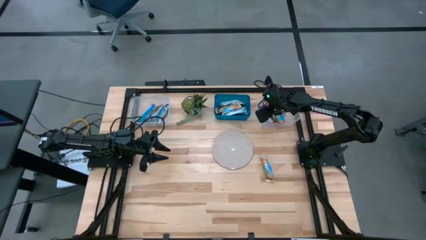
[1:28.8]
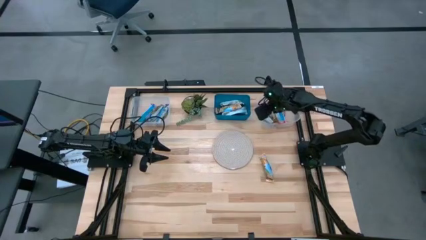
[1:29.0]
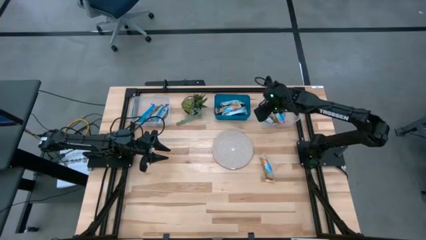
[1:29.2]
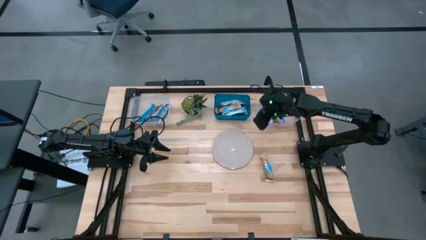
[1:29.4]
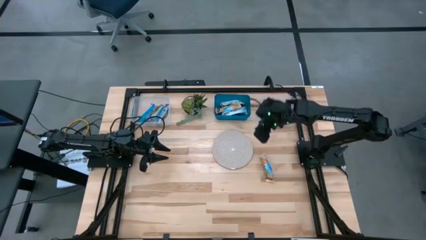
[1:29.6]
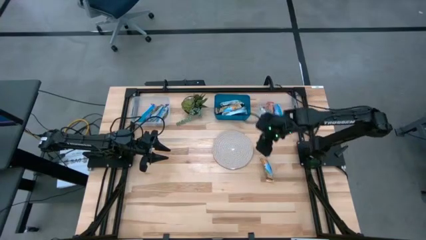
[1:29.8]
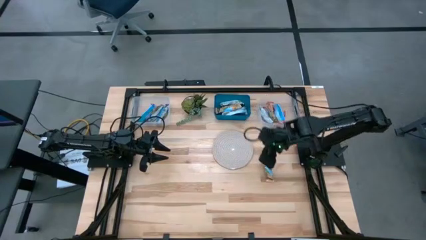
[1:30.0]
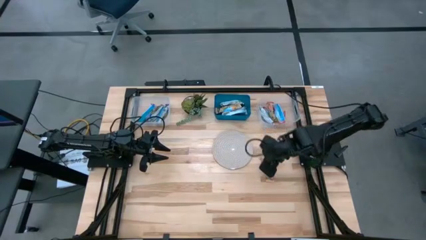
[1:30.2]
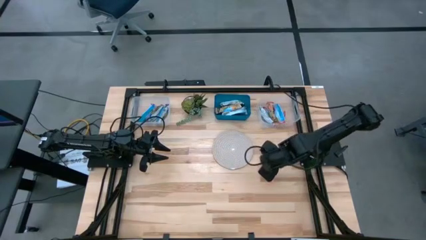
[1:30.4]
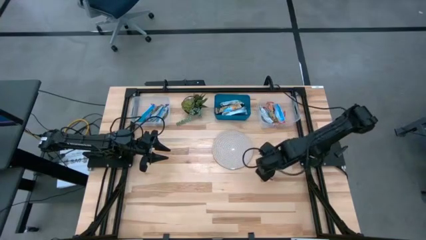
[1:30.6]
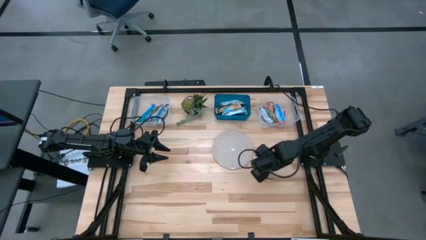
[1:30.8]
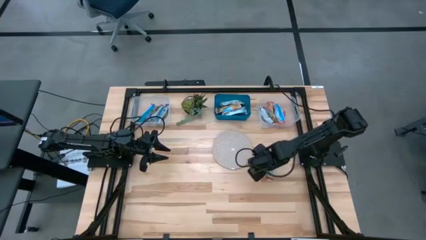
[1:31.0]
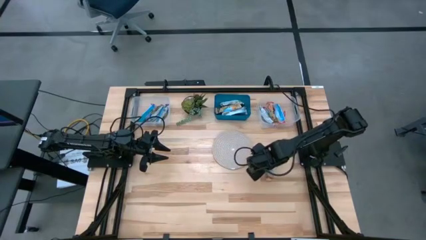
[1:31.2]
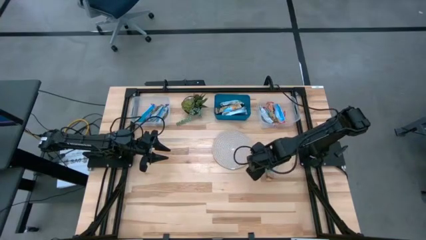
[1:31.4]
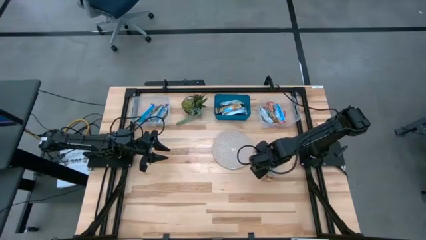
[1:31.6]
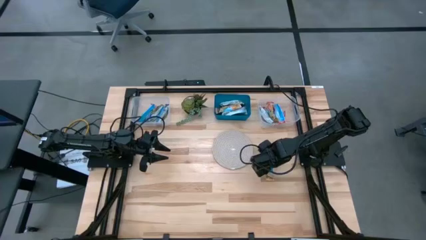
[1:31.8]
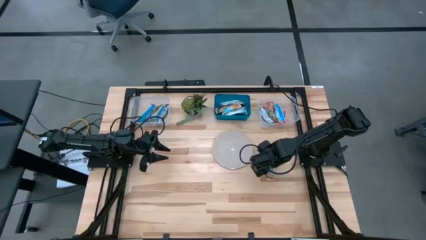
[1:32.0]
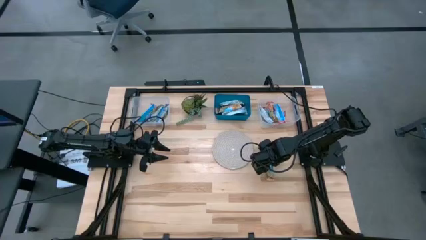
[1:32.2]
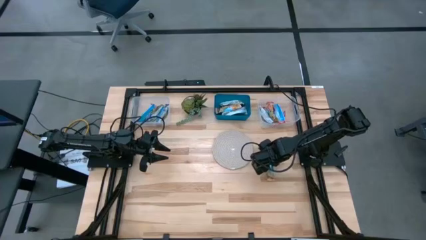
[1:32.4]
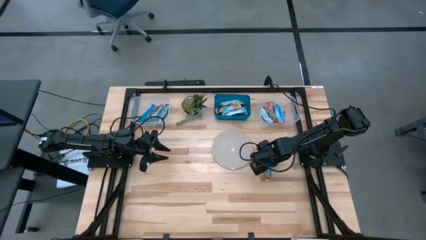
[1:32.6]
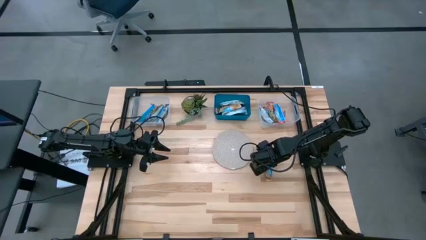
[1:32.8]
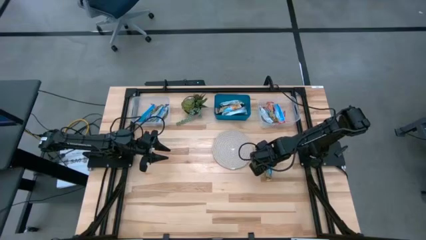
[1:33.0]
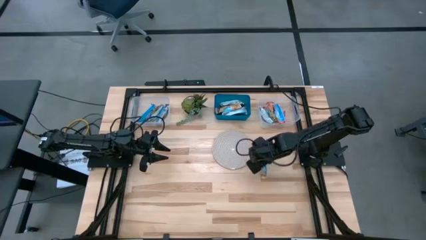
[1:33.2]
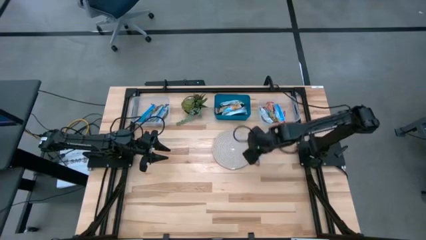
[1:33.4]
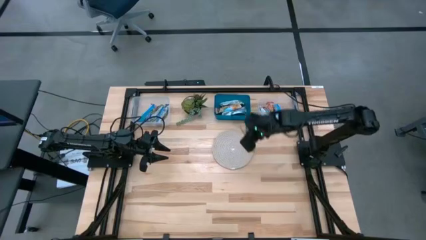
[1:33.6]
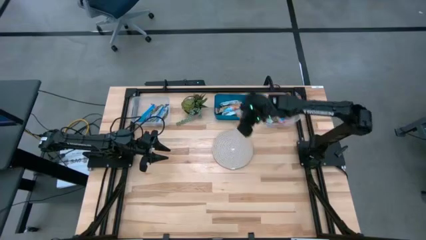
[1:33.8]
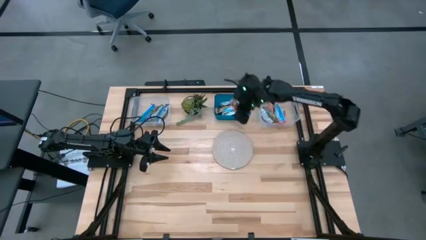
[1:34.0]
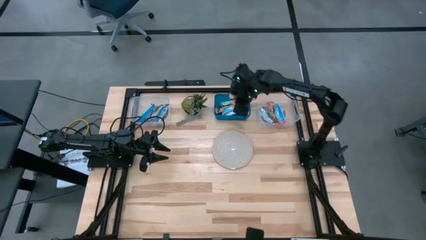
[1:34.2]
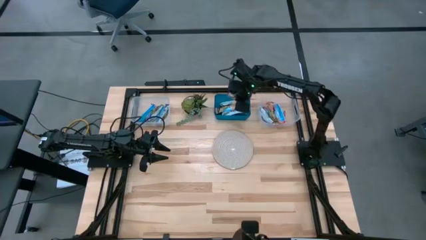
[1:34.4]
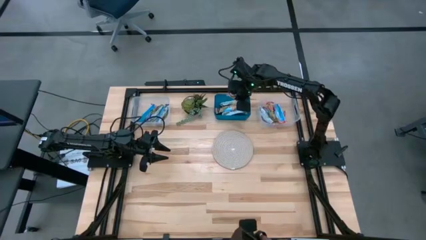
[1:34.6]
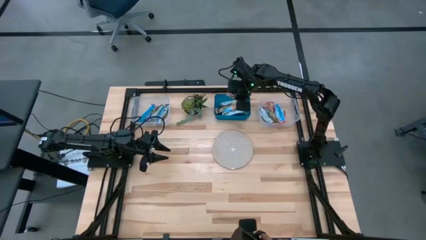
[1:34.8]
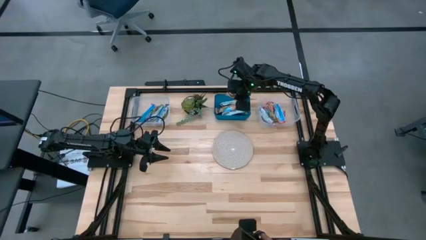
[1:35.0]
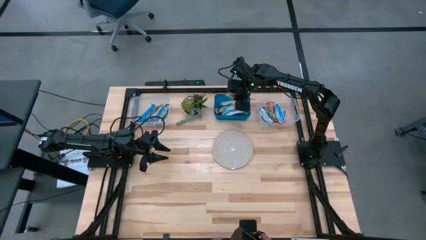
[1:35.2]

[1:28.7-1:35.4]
Task: Pick and place Granola Bars by type
Put the yellow granola bar into the blue bin

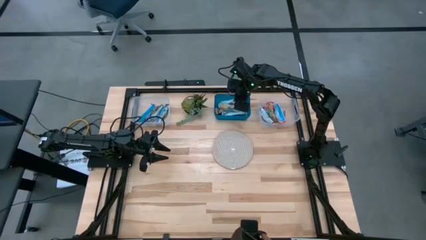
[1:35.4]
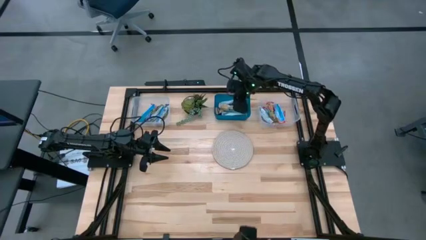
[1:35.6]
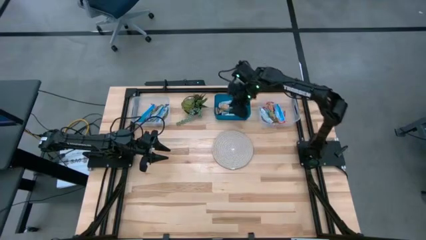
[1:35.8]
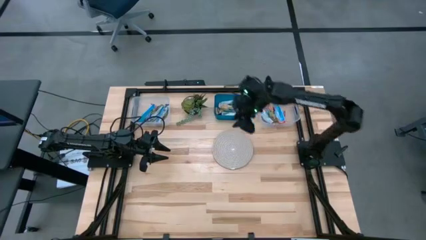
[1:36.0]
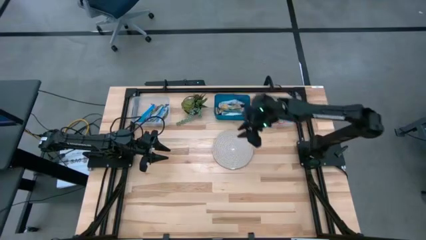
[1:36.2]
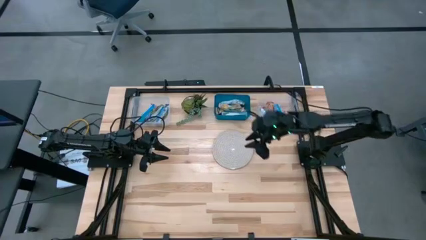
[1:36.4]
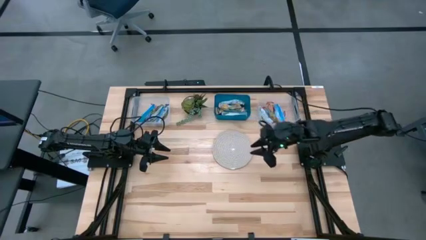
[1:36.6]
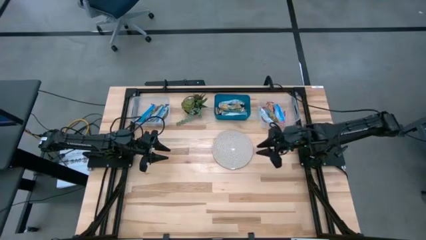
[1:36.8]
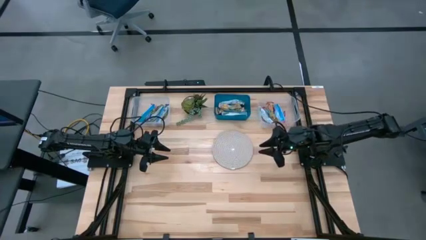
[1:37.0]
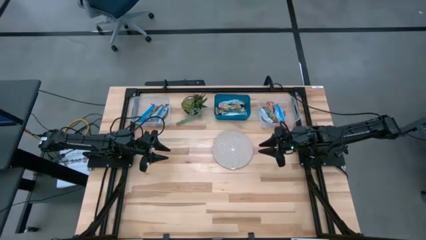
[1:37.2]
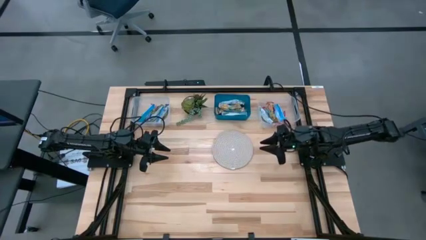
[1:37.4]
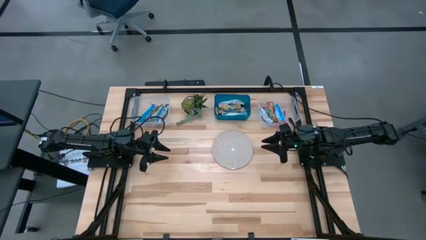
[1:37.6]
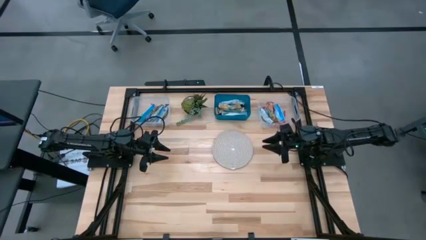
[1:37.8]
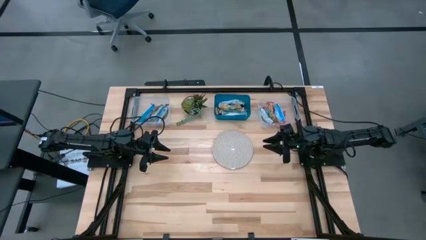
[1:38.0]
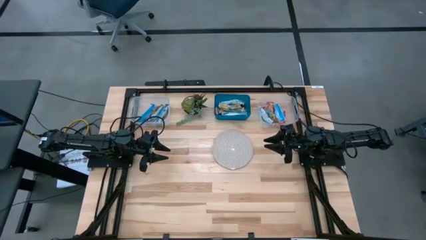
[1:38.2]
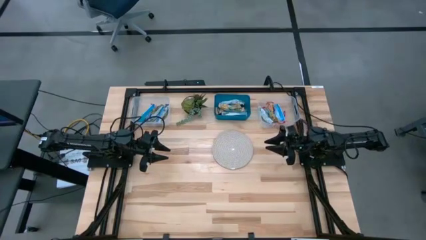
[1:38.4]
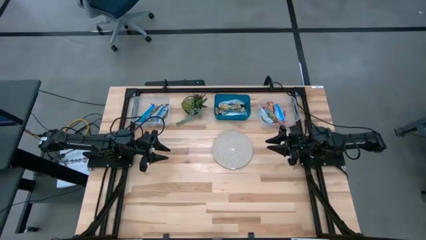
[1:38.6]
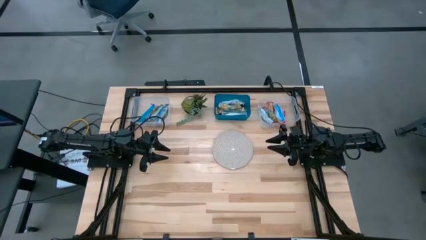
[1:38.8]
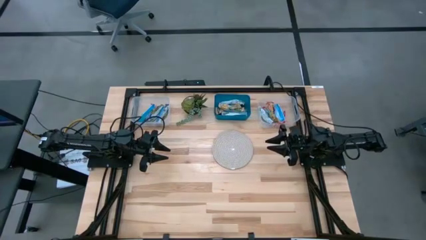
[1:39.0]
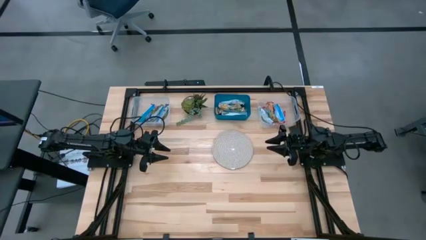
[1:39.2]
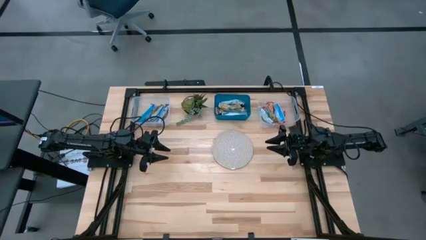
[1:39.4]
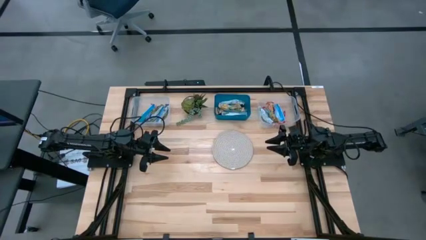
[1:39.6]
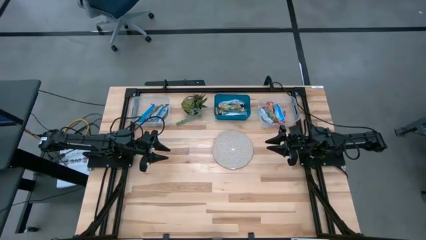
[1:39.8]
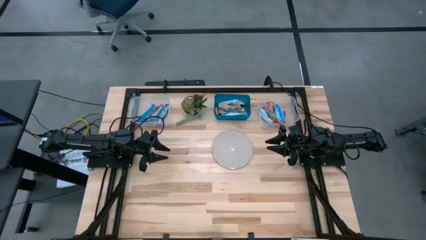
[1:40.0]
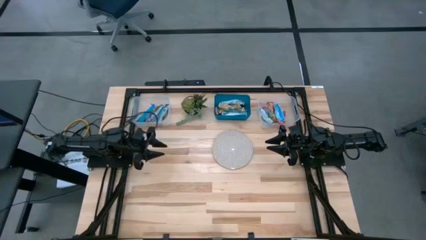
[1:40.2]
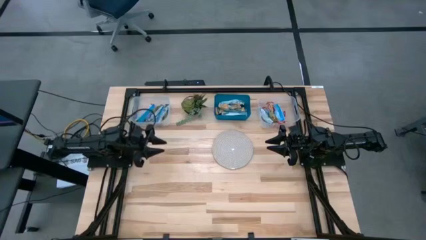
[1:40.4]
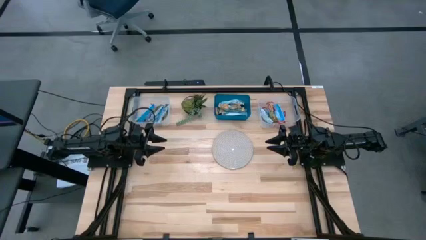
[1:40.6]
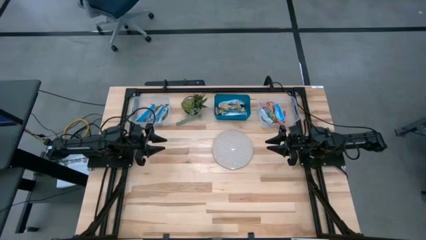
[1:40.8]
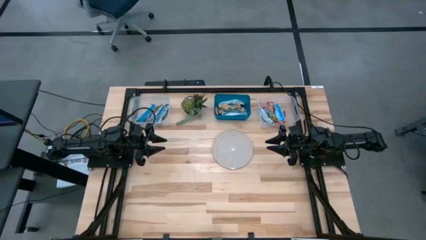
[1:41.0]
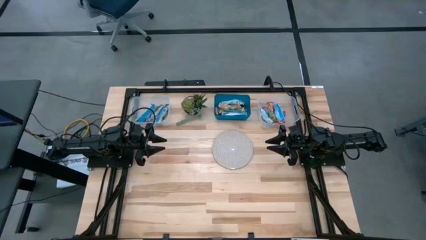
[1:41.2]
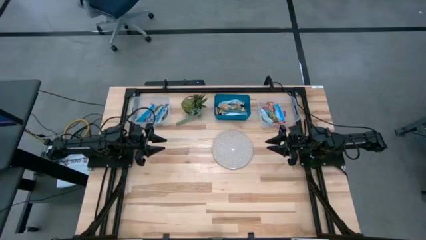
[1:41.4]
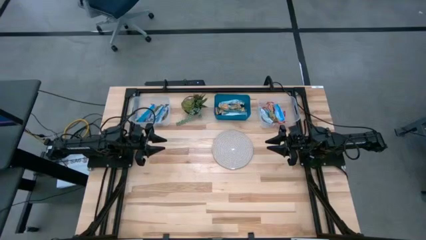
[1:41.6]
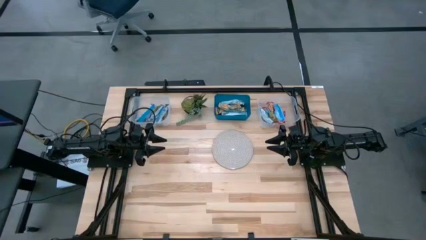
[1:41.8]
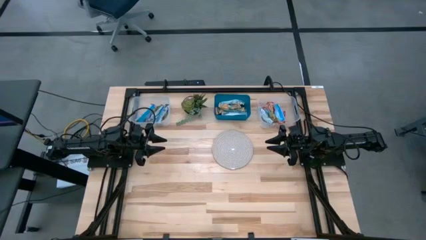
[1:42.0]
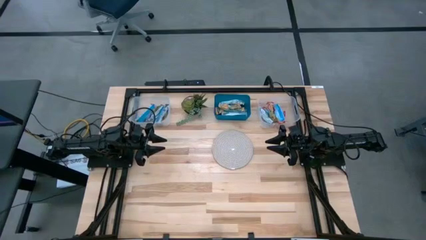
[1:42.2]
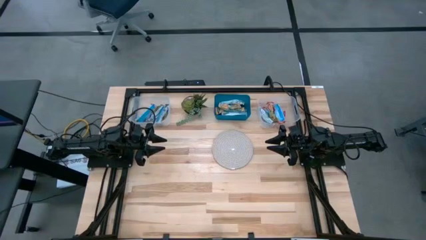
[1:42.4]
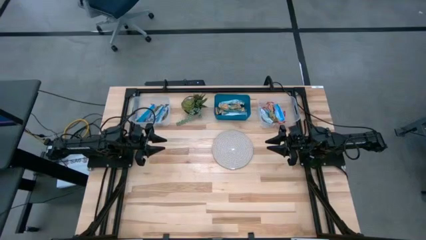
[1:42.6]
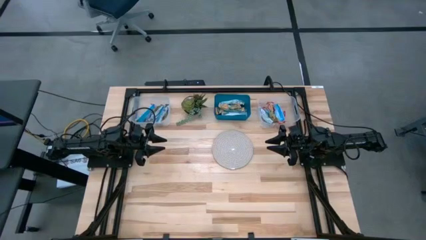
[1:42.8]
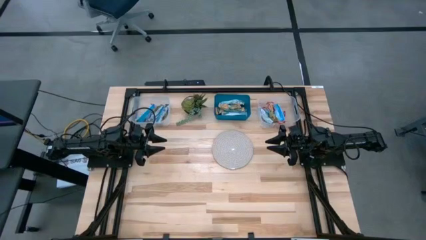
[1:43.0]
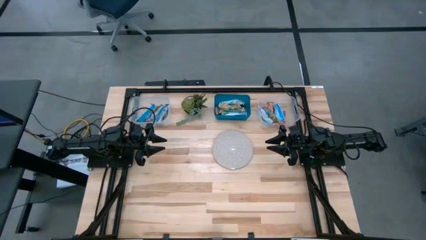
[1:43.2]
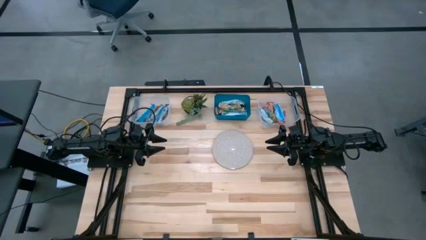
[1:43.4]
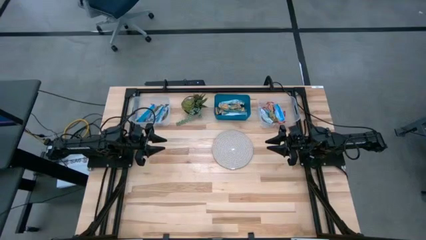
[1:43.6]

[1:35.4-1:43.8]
Return to Home Position
